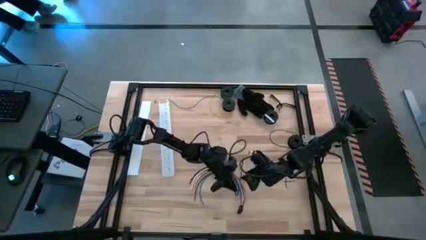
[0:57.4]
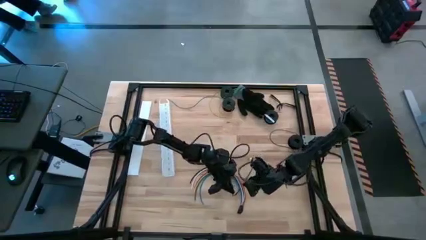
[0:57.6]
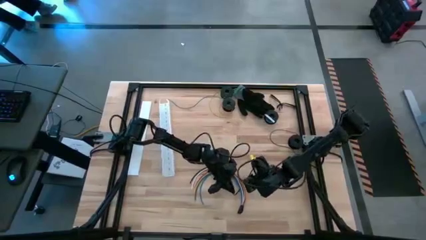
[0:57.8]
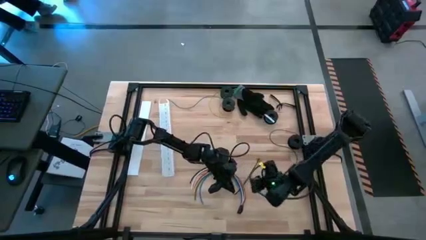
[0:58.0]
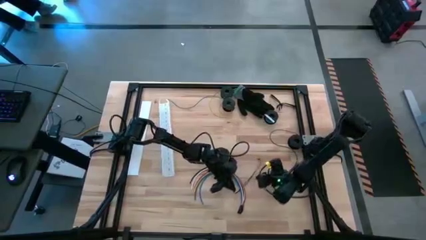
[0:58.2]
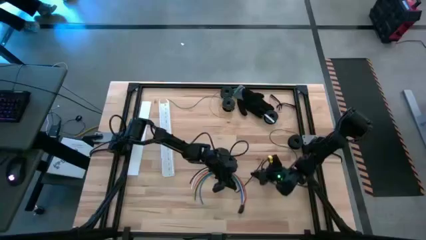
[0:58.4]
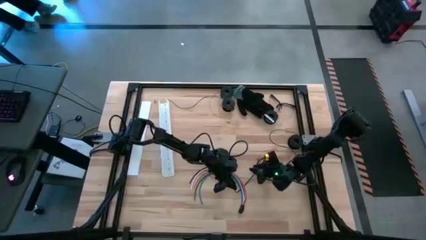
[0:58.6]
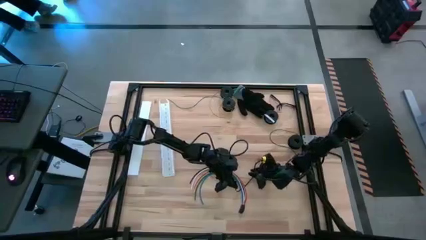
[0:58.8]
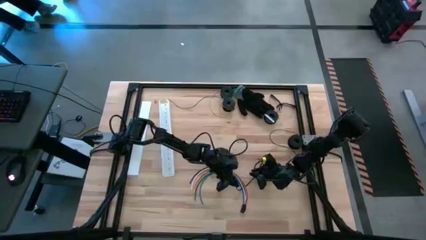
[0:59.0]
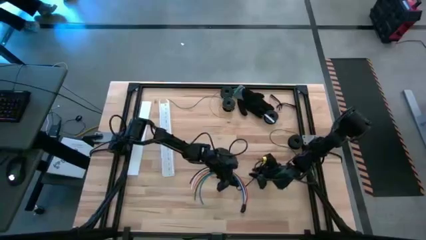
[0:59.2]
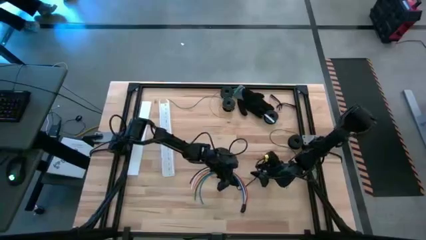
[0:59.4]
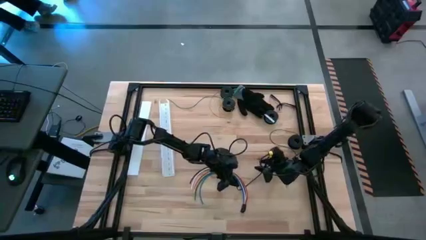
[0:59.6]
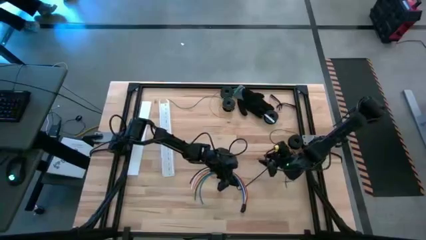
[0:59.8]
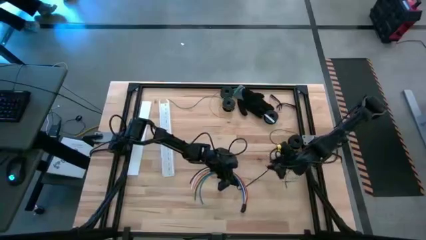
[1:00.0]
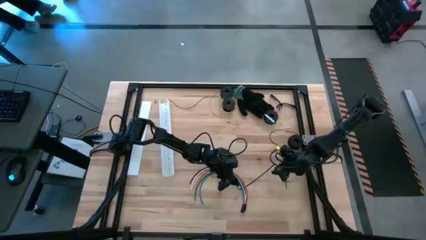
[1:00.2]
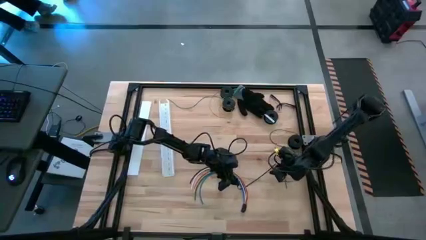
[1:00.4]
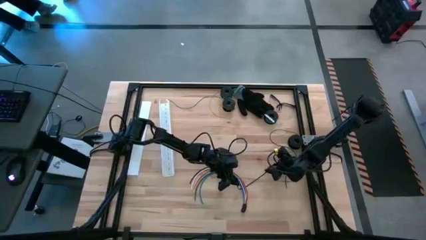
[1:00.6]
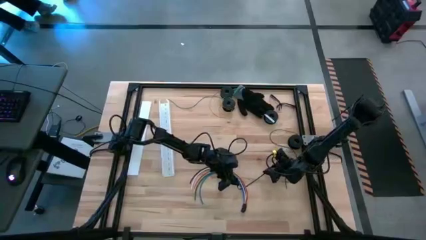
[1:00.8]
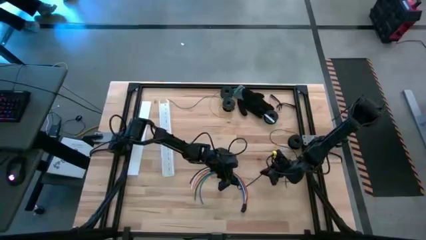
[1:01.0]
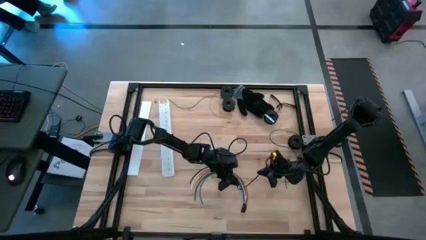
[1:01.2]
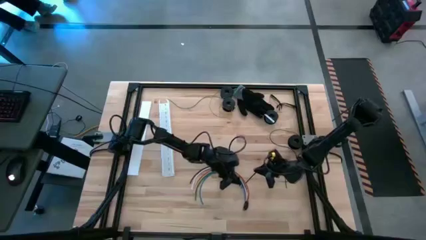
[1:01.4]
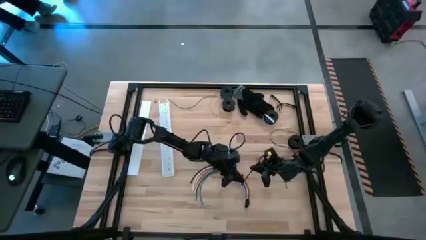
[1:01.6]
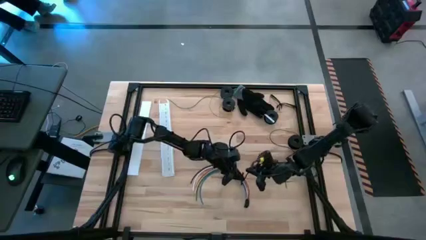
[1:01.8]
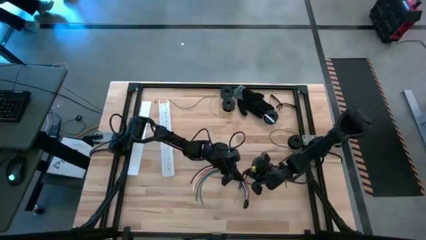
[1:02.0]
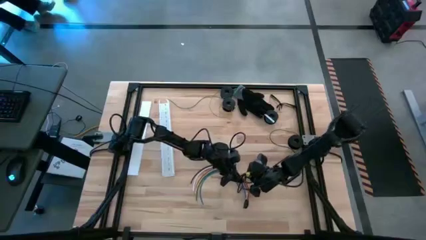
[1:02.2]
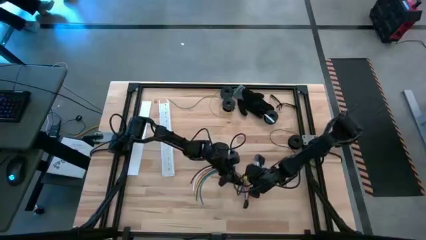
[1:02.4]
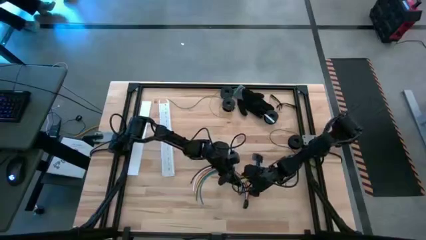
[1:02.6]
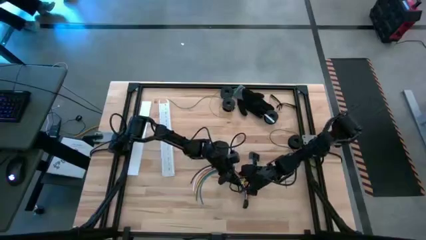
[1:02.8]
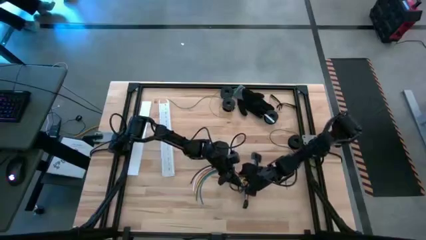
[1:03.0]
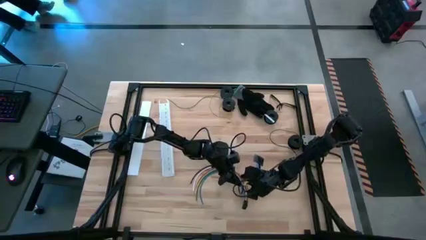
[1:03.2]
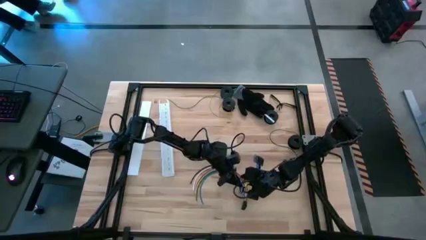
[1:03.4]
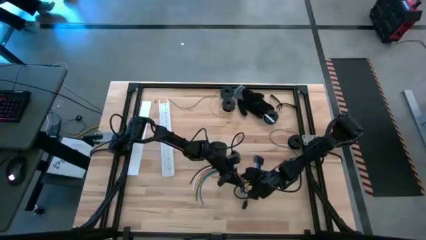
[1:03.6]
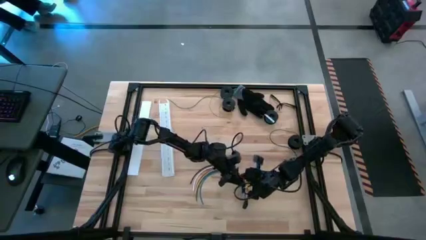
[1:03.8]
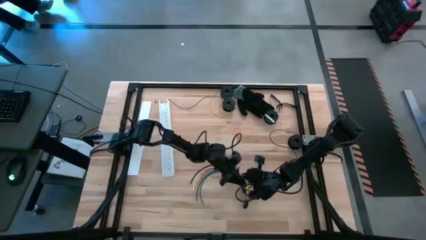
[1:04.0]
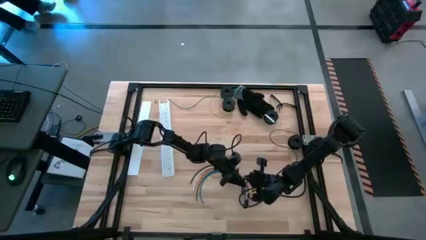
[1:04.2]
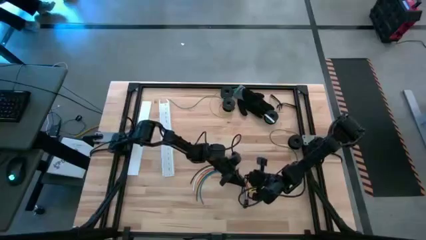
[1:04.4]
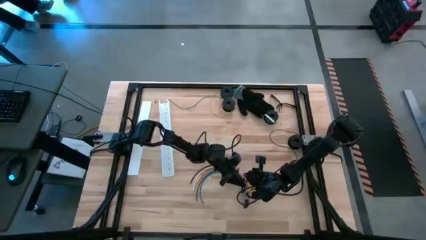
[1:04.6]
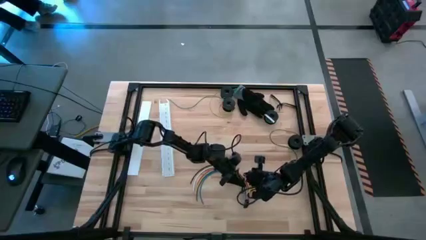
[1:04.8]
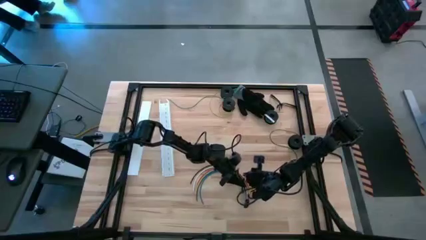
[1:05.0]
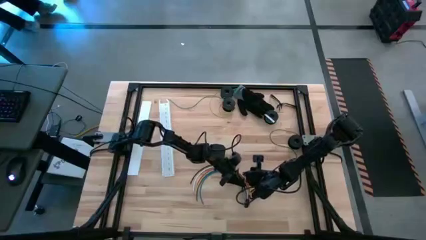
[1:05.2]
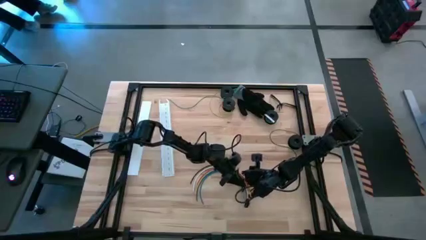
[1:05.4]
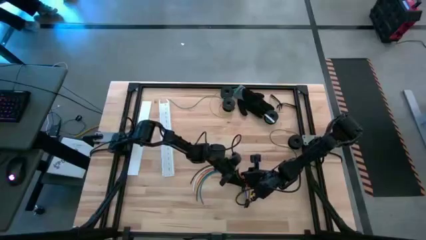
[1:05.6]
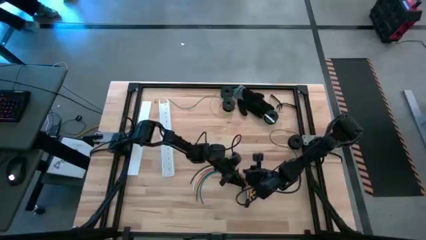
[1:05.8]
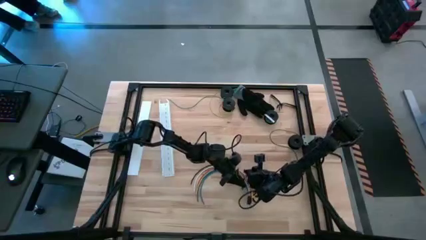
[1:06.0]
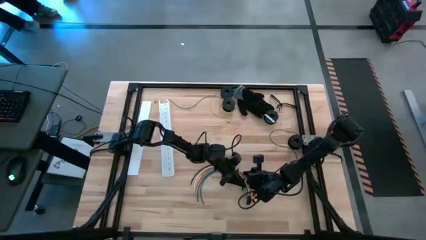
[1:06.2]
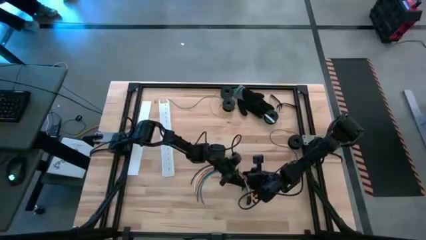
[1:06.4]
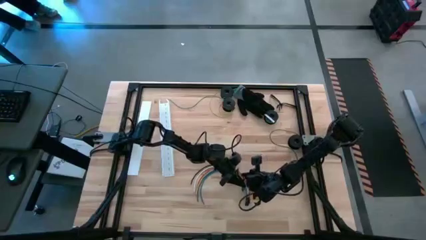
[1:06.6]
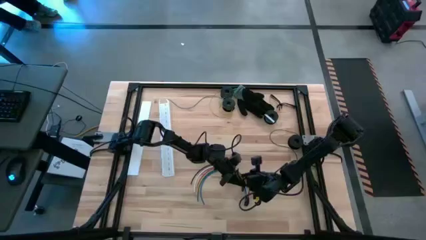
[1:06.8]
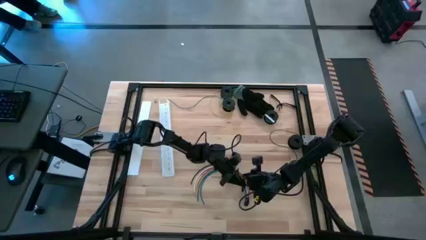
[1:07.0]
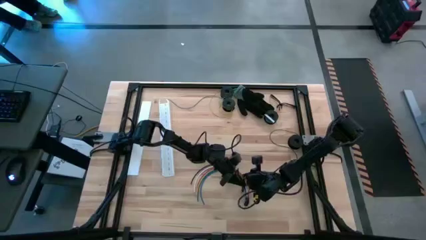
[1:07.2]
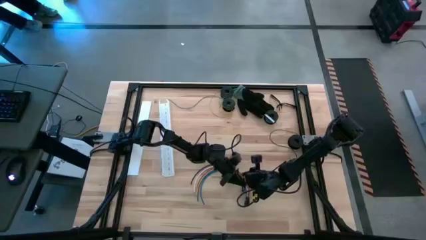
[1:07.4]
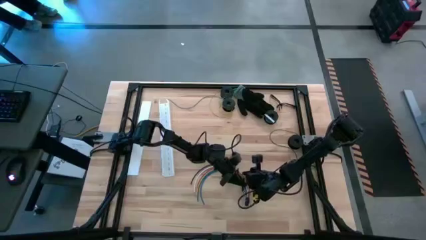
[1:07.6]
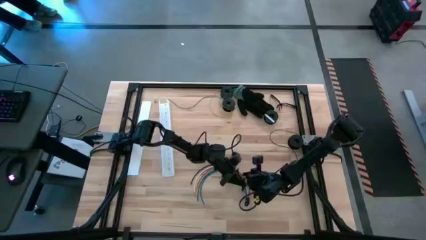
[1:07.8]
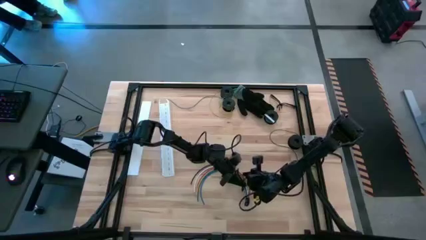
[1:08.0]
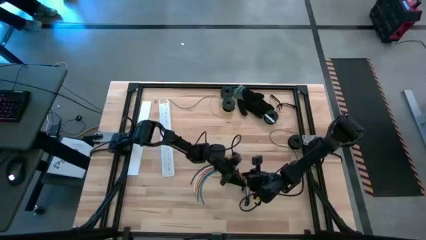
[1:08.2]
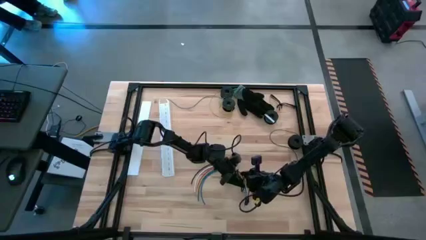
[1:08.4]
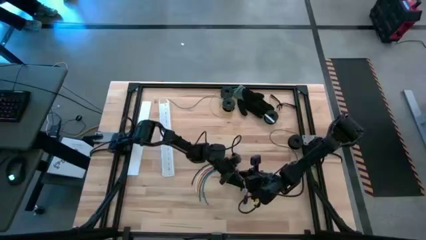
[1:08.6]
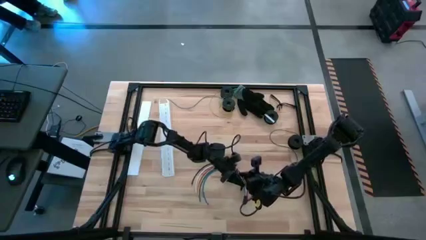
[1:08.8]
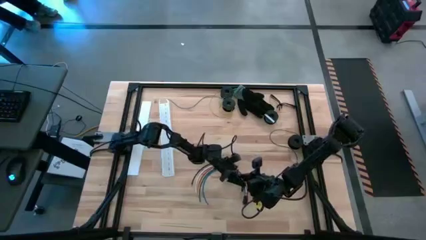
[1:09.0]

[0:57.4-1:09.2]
Task: Ziptie cables
Wrap the cables together using a black zip tie

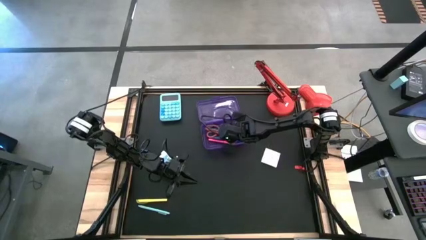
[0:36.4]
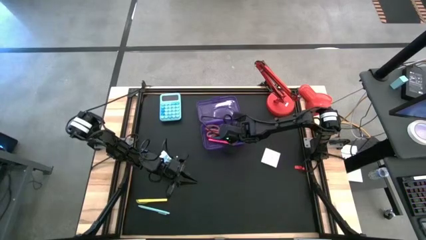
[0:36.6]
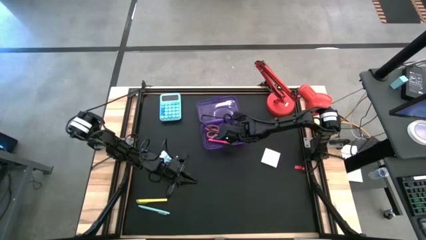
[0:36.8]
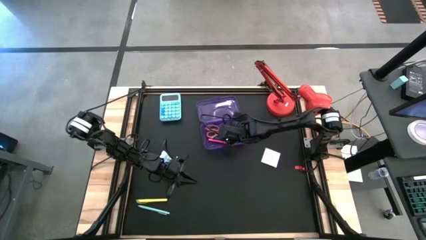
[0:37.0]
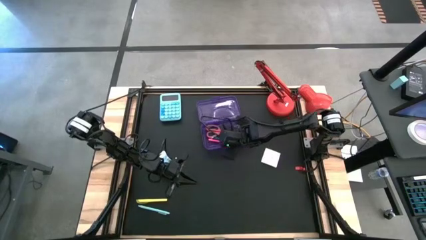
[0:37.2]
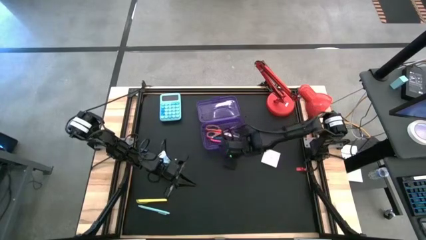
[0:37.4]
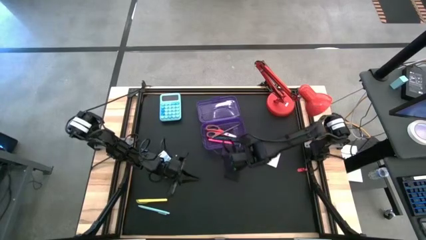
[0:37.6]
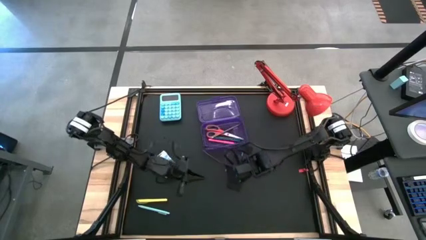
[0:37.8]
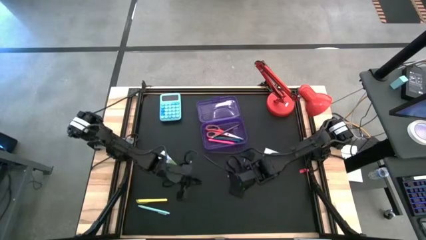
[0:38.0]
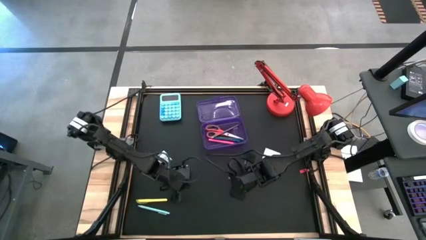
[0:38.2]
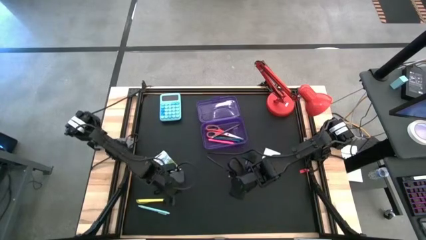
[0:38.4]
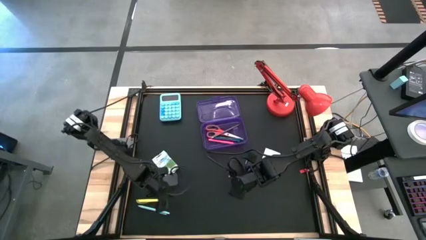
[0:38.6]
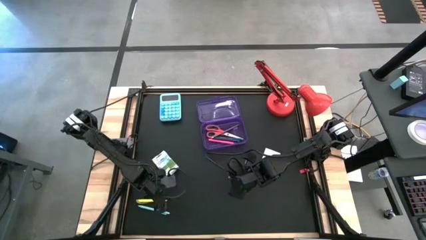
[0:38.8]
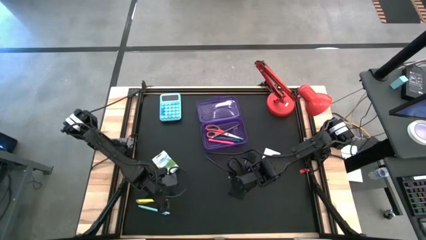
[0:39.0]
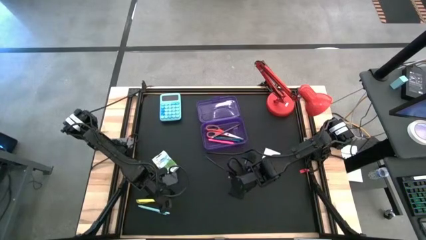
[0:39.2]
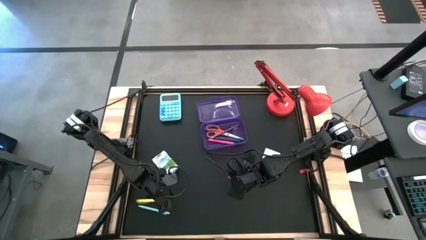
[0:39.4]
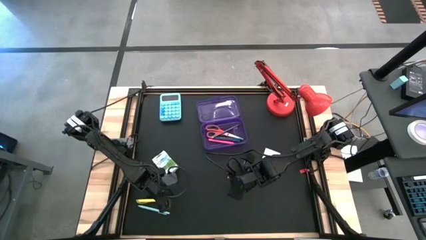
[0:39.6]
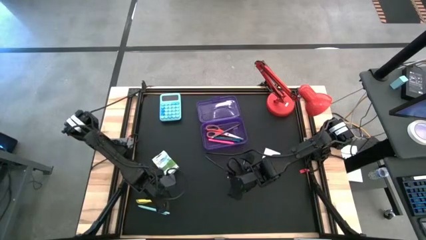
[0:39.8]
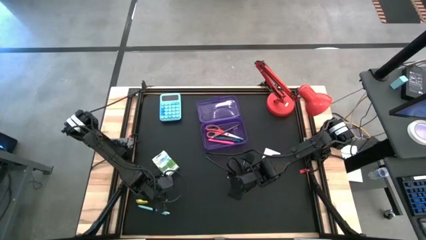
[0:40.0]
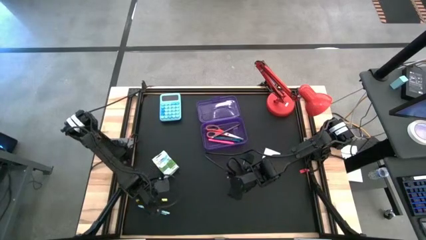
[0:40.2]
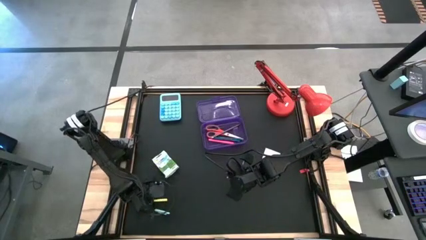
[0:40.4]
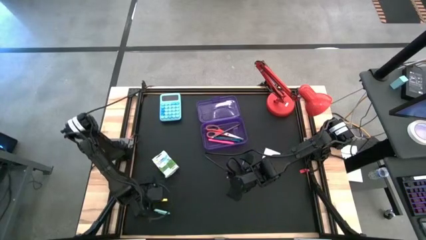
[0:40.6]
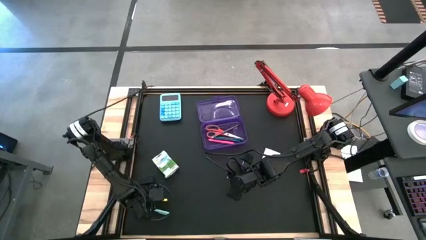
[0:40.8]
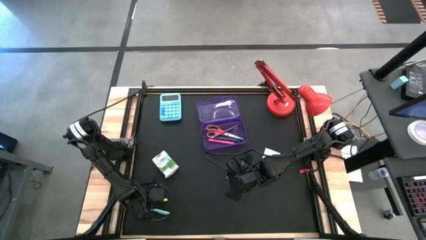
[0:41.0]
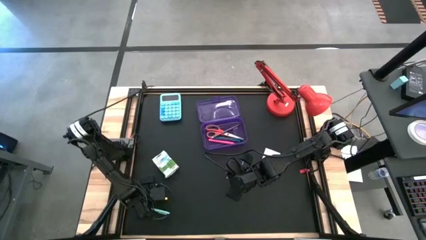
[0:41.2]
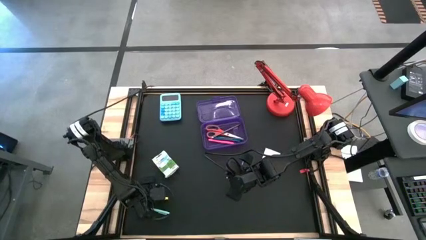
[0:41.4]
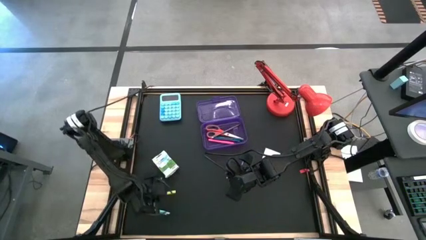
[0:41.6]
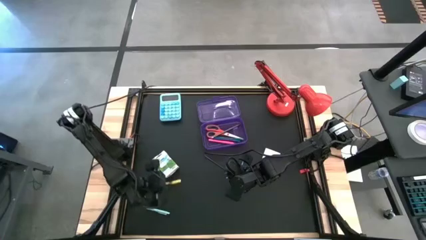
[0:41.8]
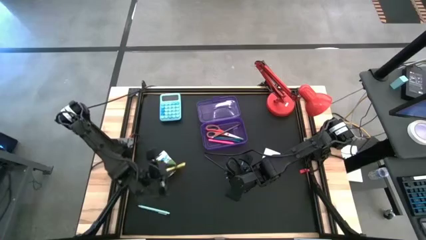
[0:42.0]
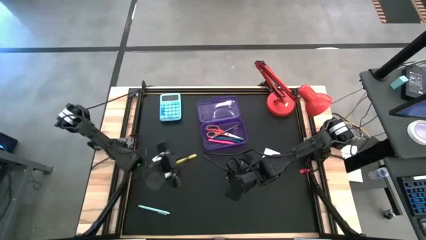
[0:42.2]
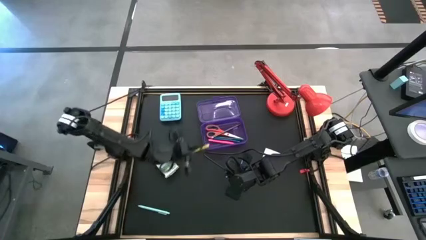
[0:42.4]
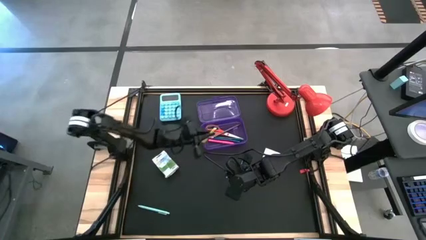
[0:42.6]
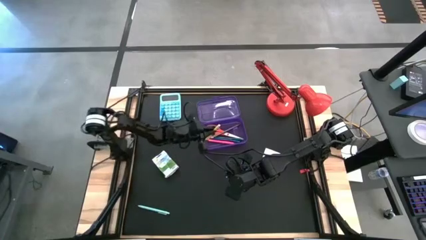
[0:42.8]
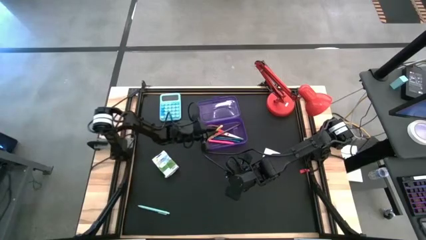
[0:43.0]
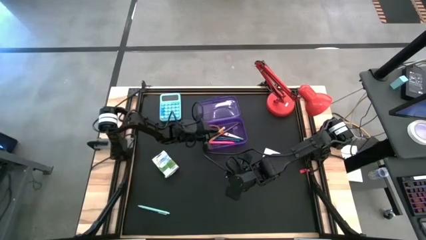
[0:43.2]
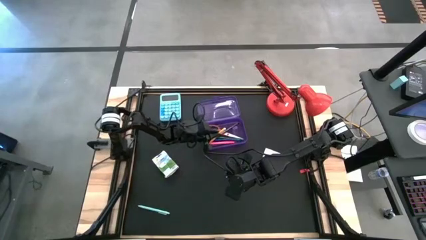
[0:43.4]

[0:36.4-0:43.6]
Task: Pack school essentials
Put the yellow pen into the violet supply box
